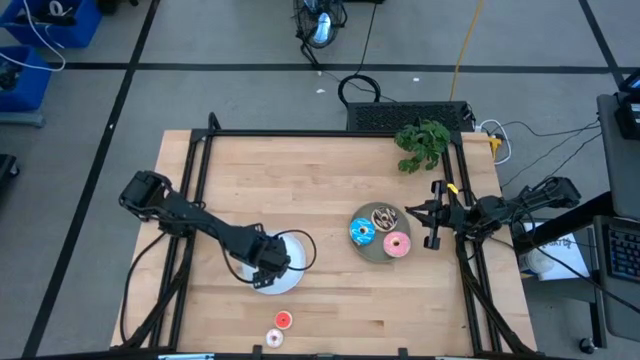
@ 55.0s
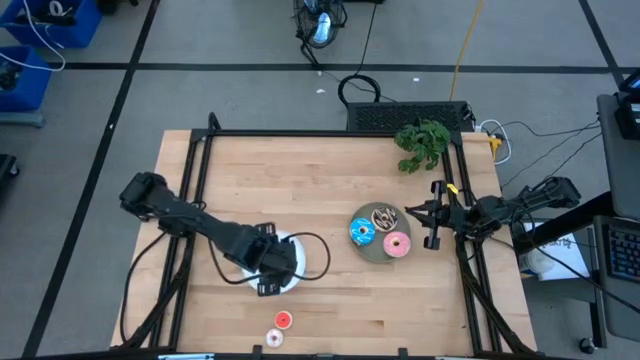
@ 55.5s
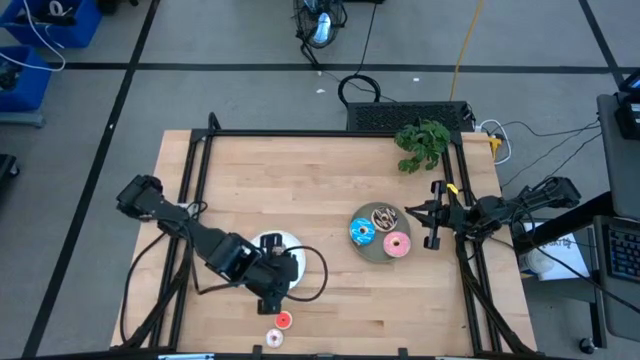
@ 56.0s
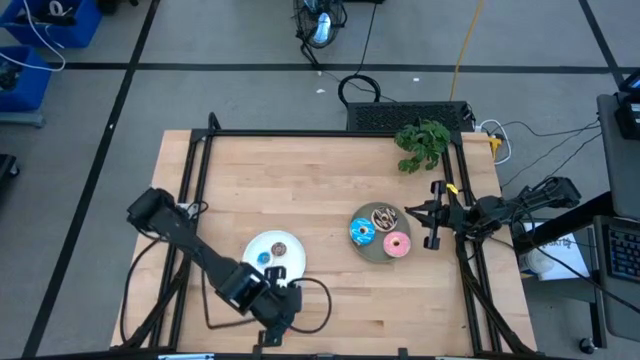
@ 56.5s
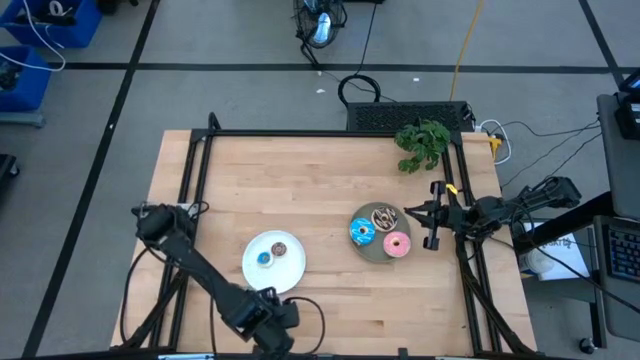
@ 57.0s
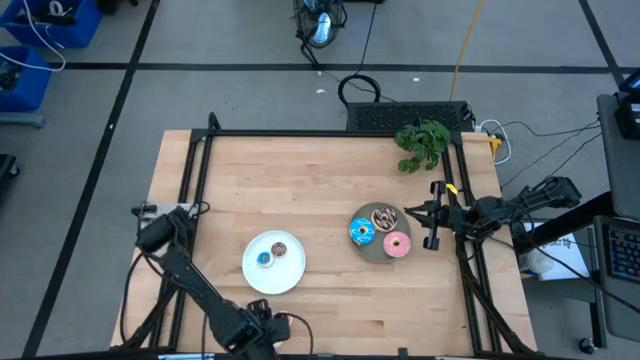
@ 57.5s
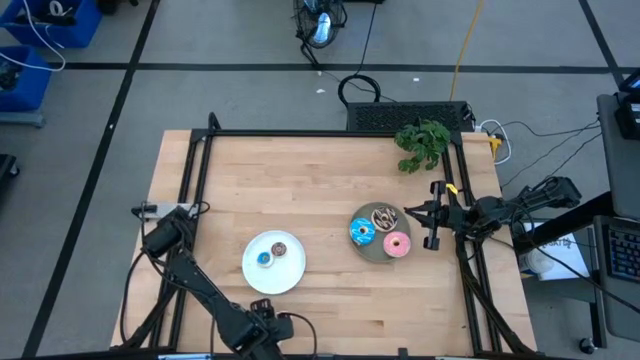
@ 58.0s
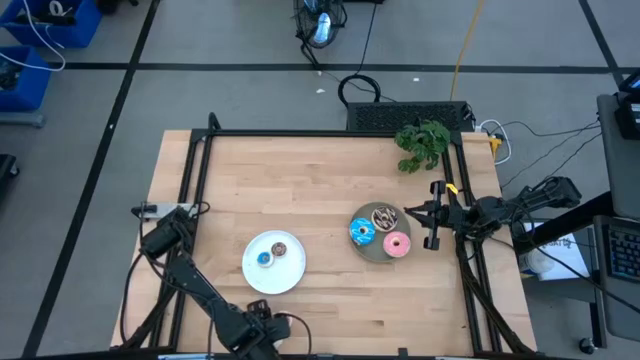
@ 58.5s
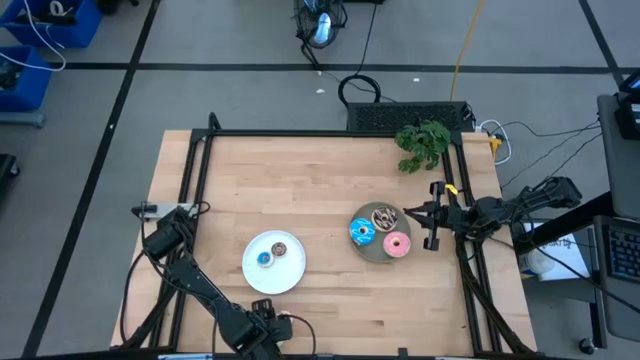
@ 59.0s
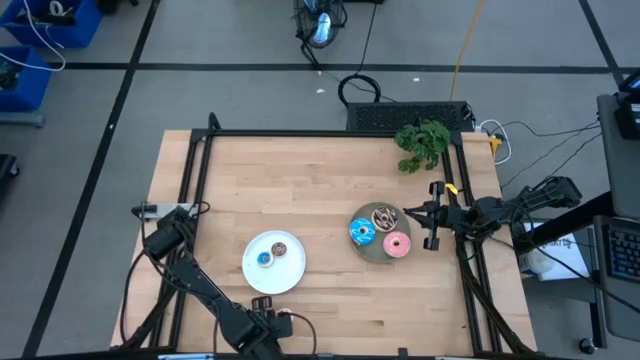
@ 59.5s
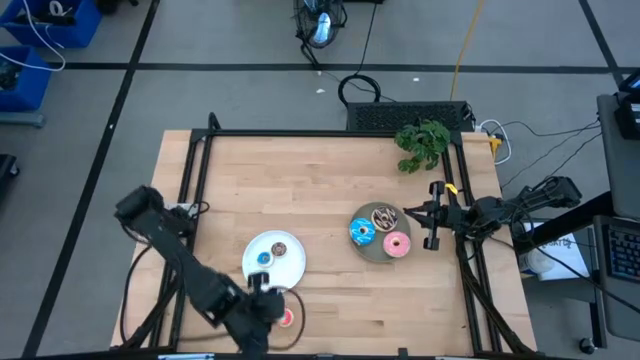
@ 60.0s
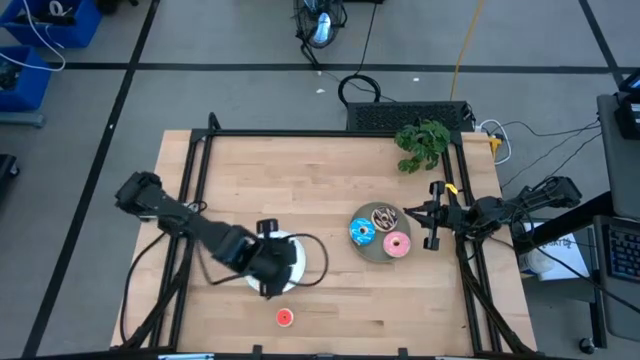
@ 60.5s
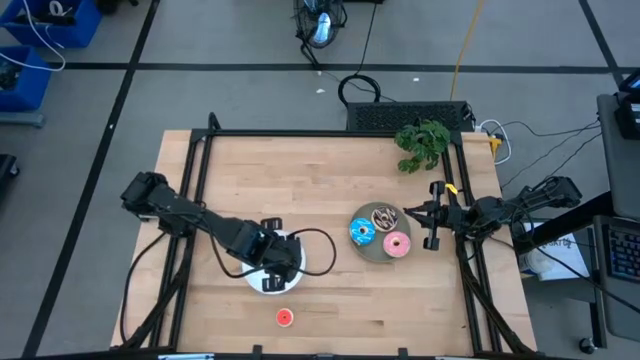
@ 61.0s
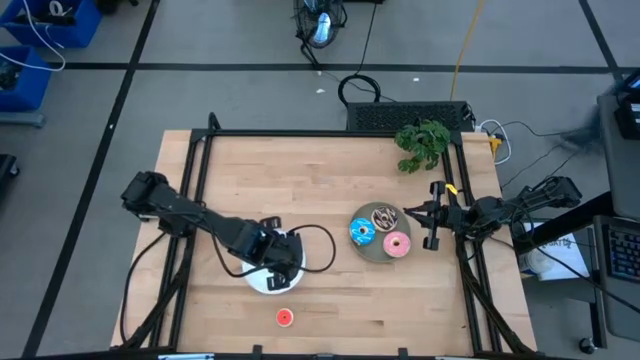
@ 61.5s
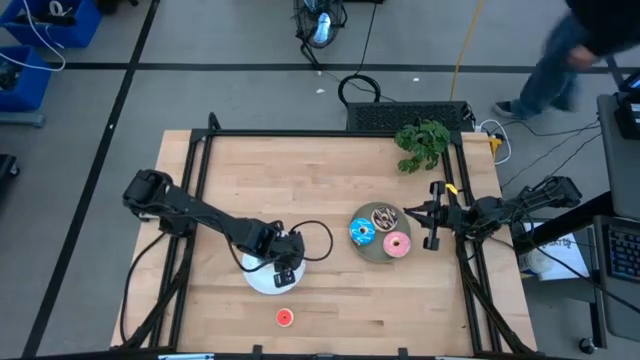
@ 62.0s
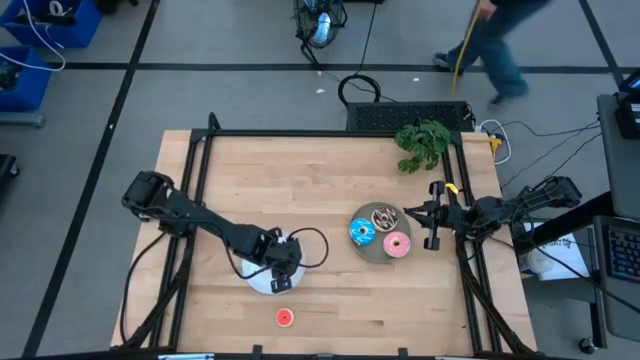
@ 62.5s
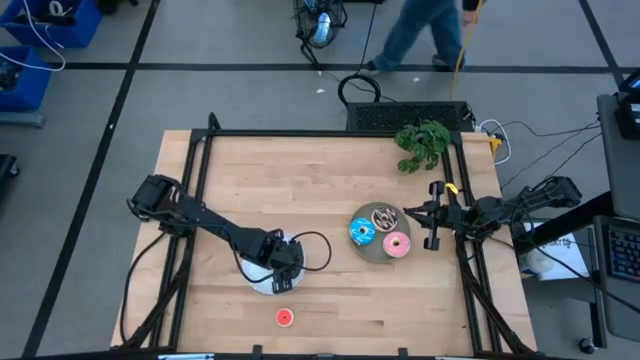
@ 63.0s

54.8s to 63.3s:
Task: Pick & Place donuts
Put the white donut on the white plate

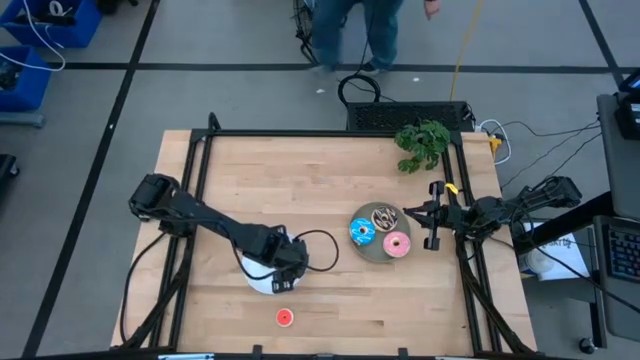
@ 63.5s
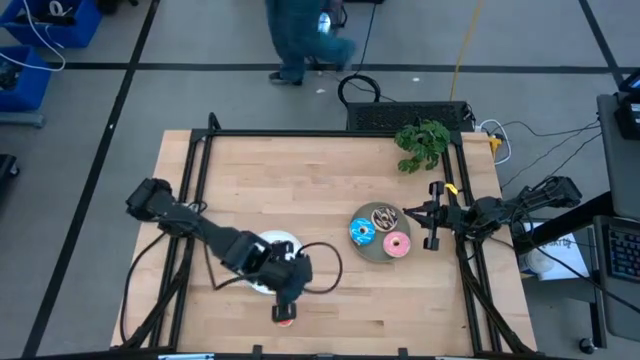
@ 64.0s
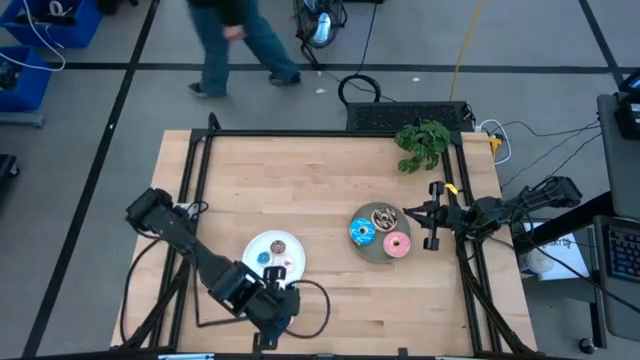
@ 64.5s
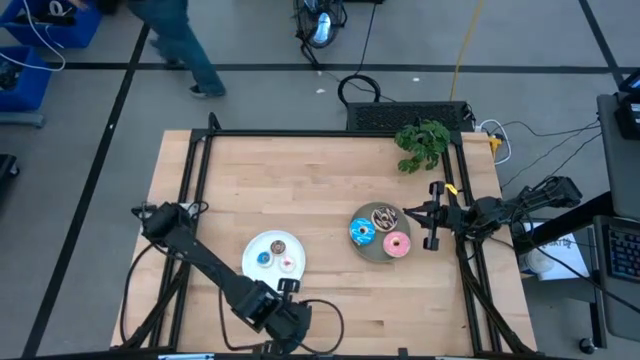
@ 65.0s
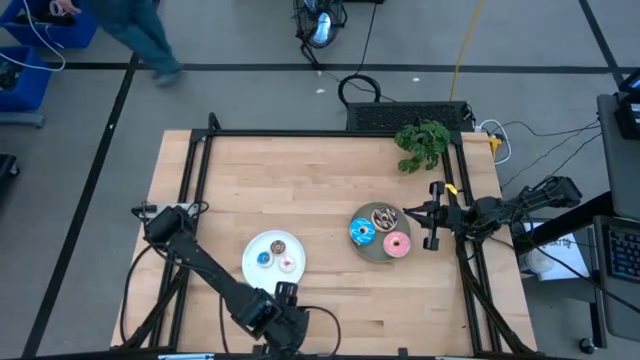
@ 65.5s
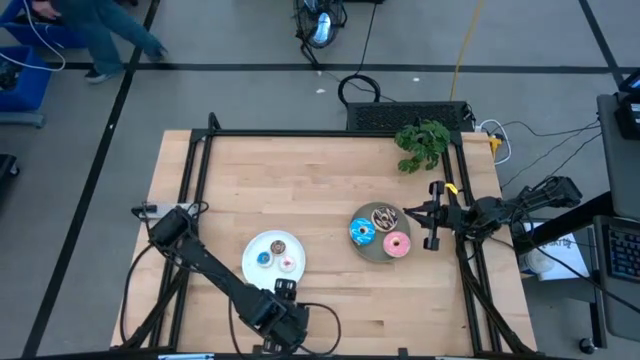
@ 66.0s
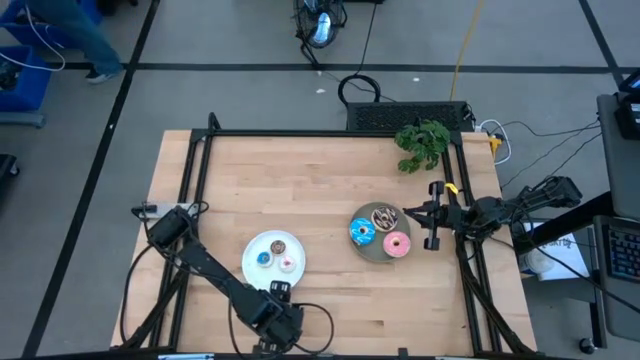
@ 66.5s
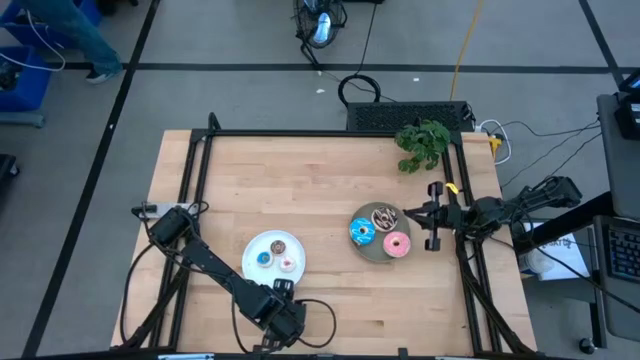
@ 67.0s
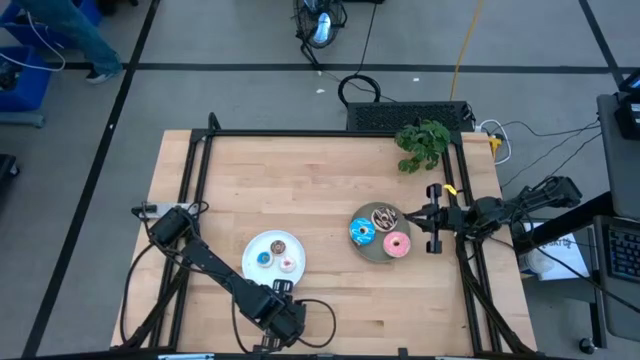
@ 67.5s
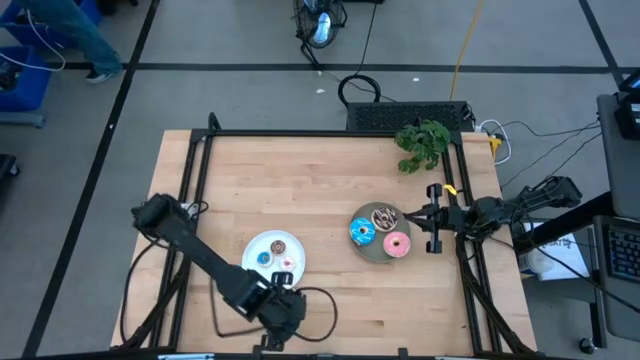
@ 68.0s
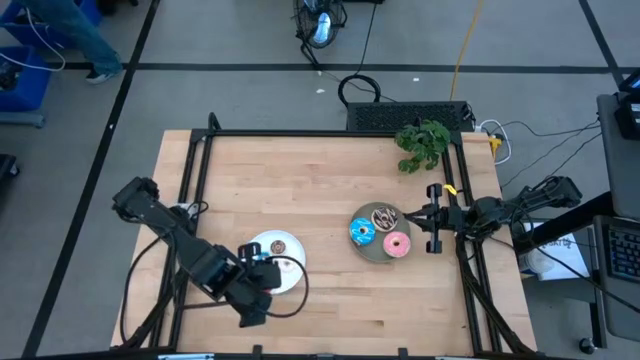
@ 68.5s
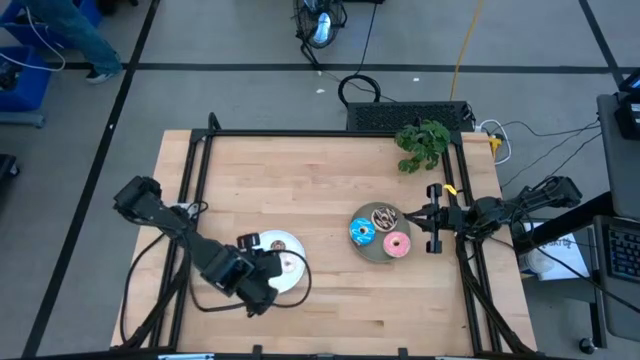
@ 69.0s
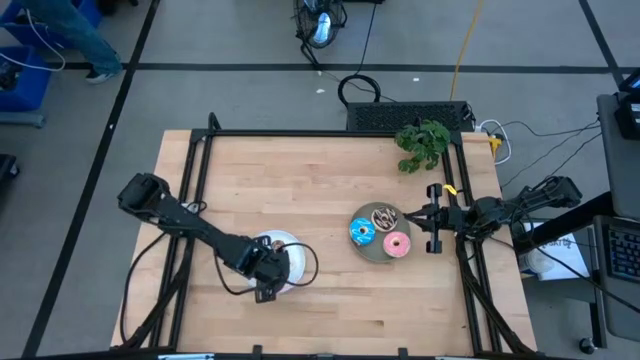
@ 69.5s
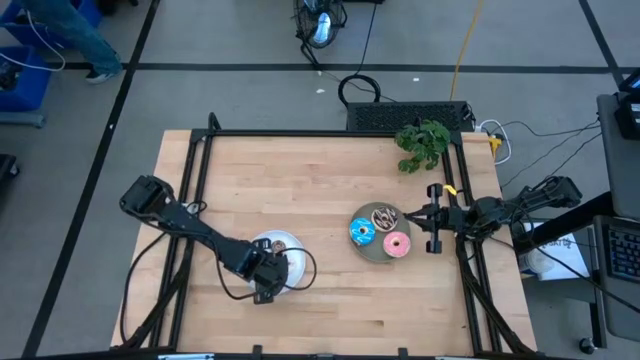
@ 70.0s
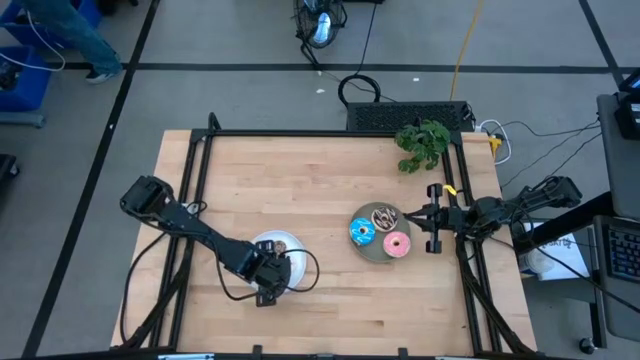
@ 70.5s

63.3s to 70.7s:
Put the orange donut on the white plate

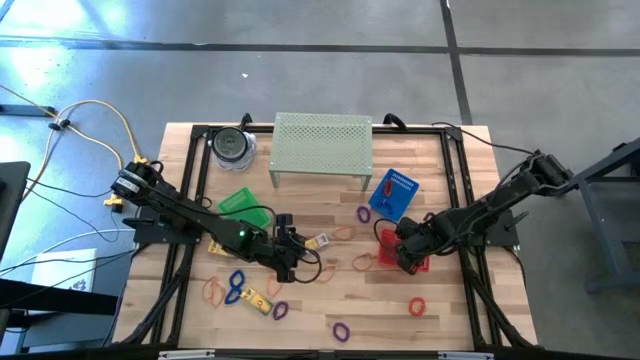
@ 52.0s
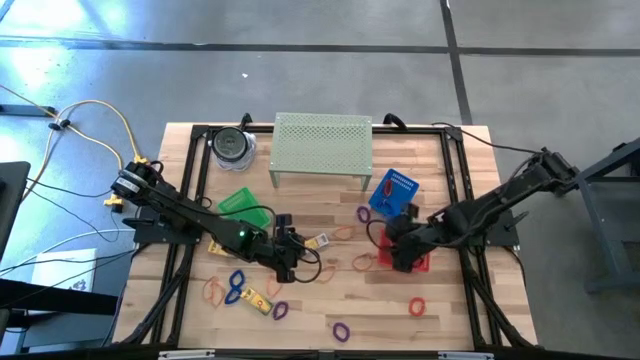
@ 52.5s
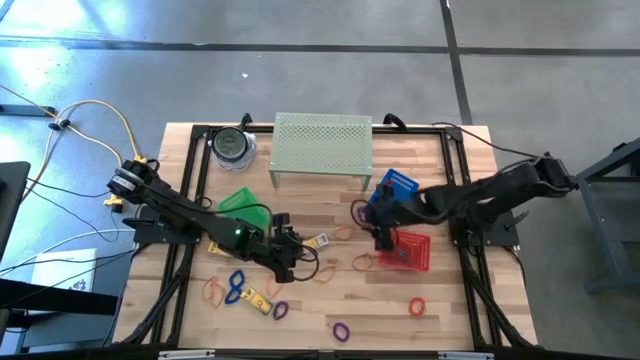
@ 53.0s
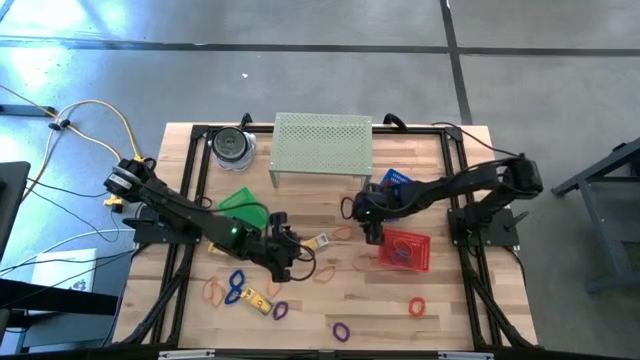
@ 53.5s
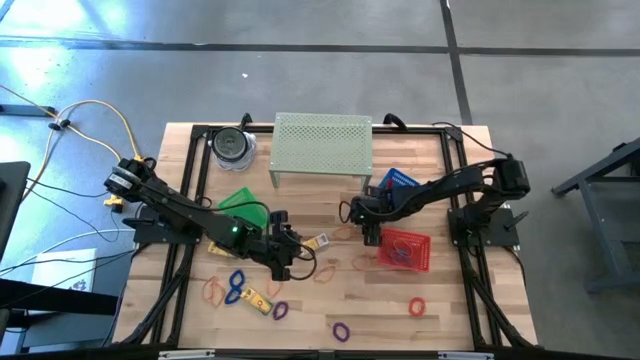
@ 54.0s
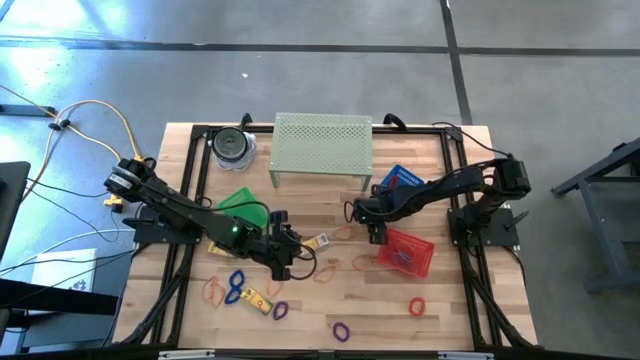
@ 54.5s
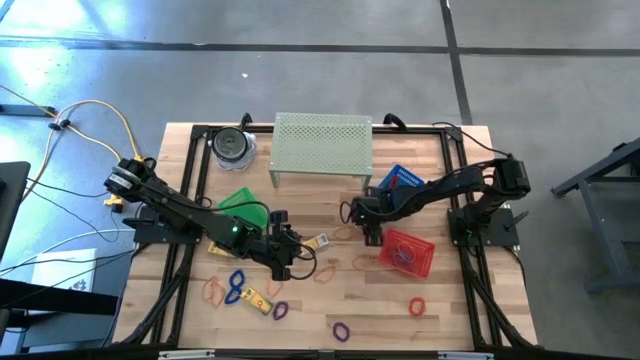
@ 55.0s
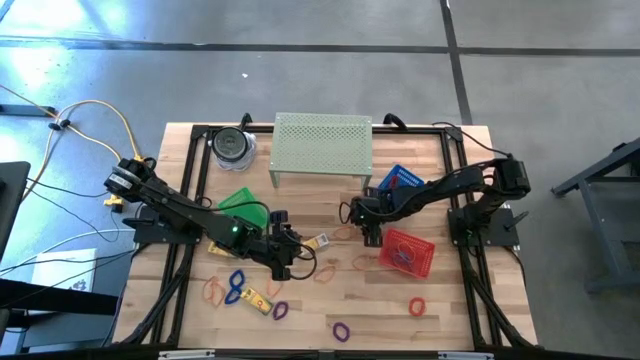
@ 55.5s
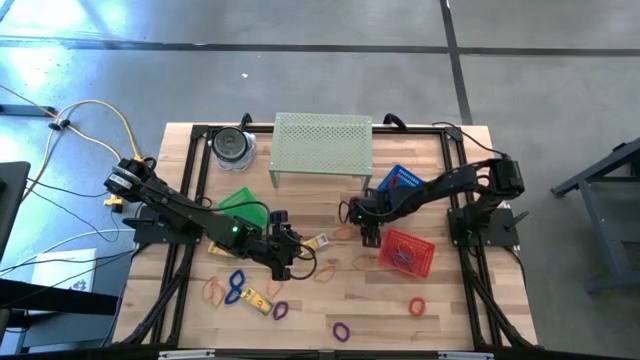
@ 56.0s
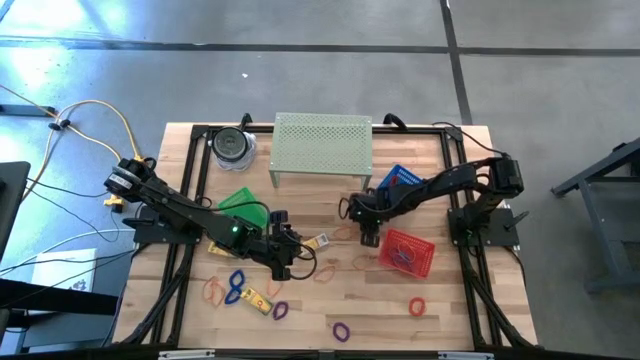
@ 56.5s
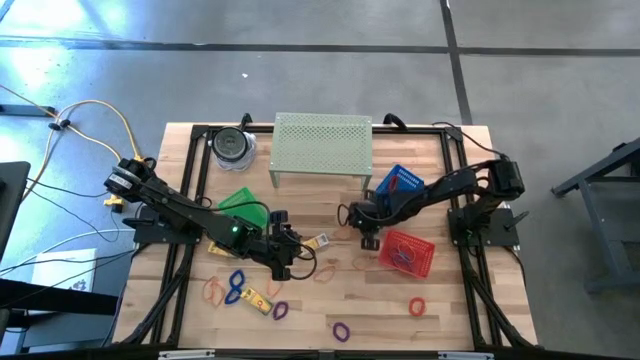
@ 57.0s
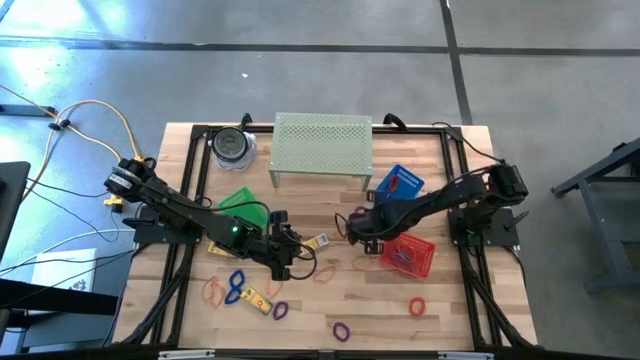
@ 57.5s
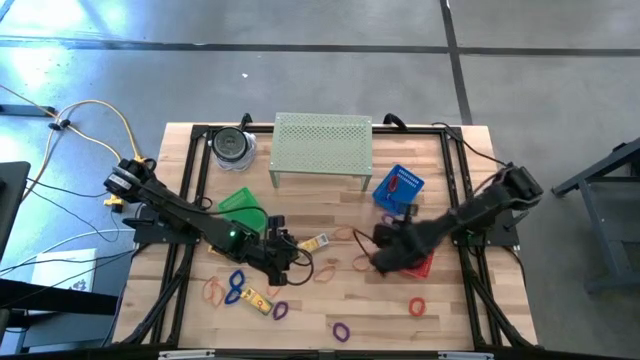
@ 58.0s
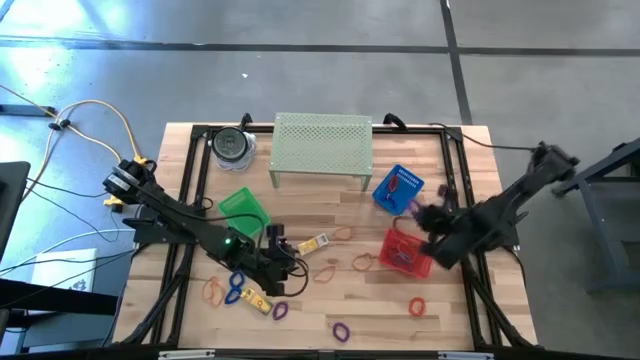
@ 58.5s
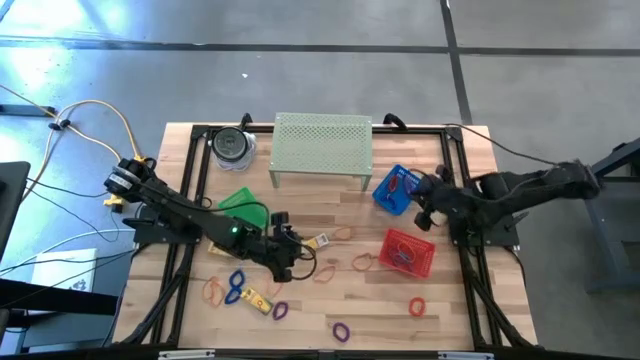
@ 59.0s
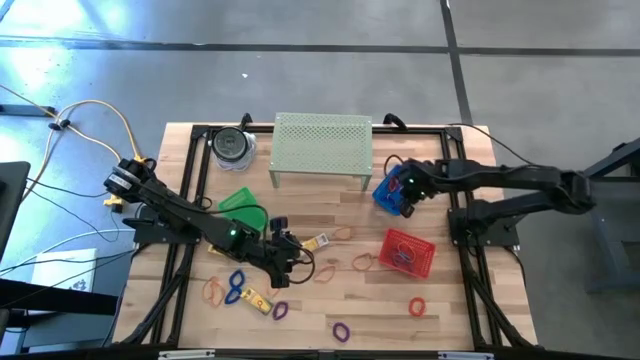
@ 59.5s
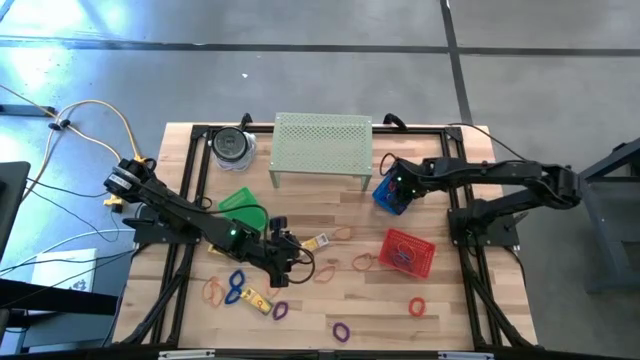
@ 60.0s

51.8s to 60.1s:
Task: Pick & Place Office Desk Supplies
Put the blue spring keychain into the blue basket
